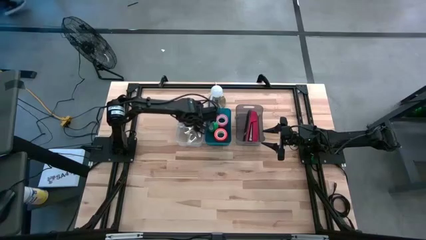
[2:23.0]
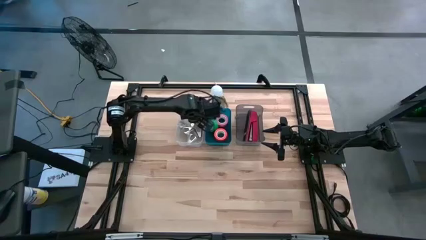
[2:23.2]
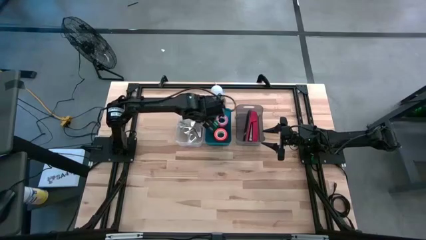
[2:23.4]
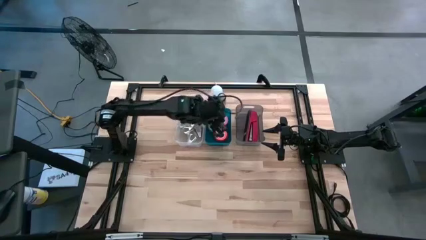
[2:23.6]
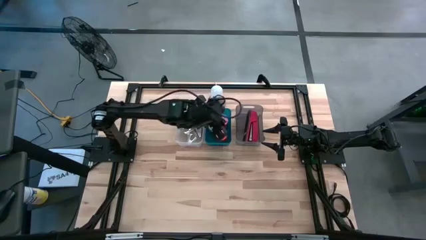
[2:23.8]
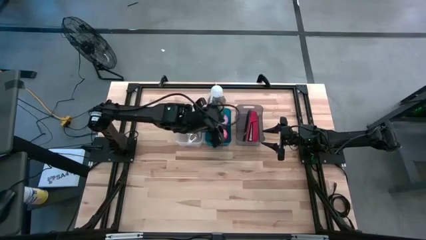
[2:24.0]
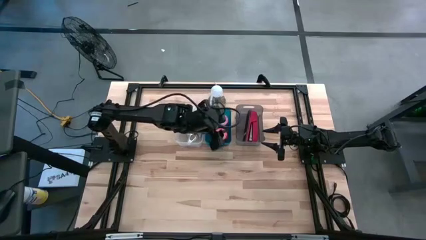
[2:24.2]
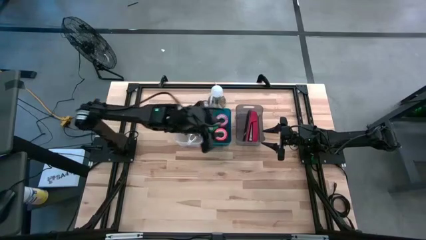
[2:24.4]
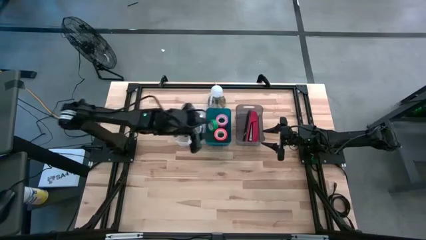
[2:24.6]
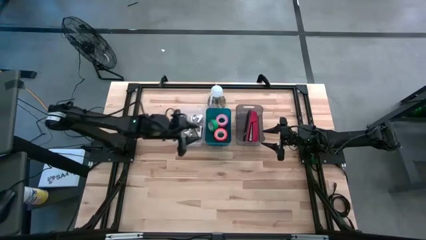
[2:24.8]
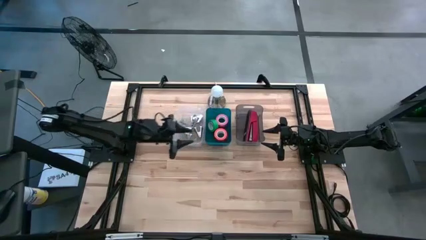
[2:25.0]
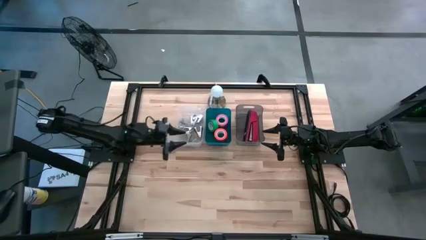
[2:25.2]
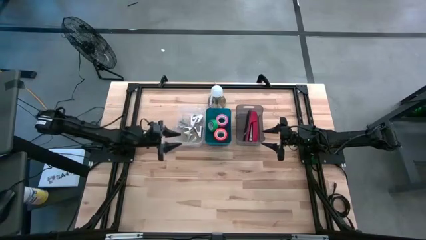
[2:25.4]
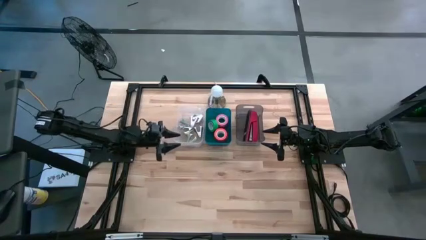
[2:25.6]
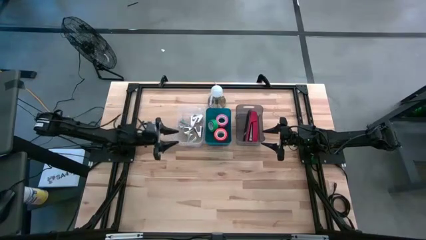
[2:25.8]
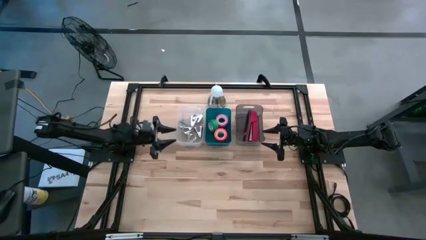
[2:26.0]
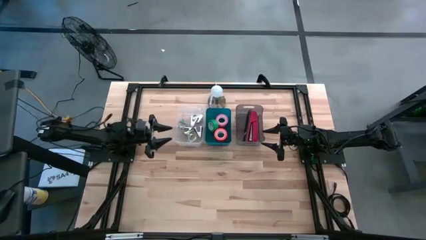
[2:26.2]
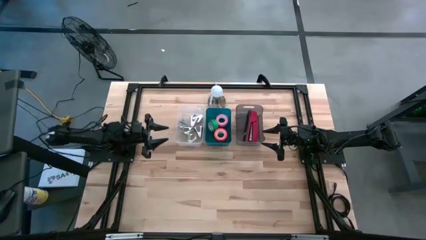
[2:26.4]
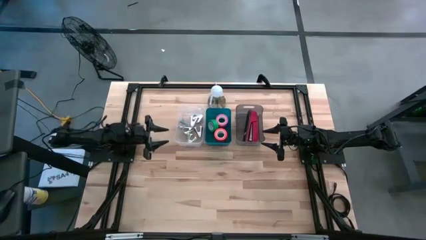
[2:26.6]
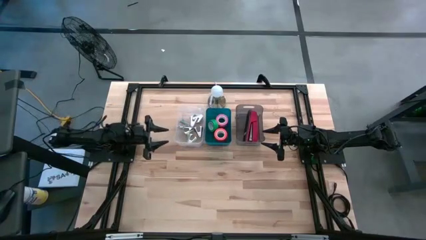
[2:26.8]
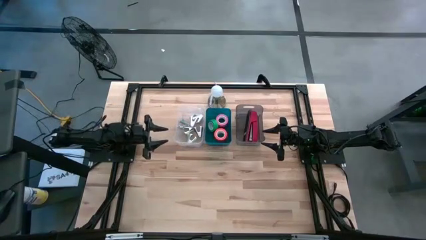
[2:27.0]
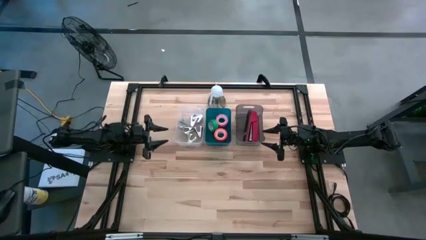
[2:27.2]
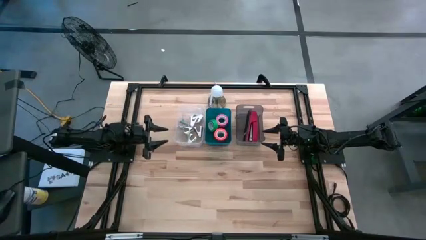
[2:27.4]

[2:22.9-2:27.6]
Task: Pick and place Stapler, Stapler remover, tape
Return to Home Position

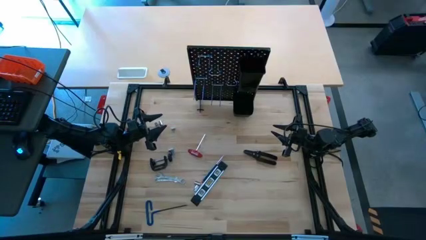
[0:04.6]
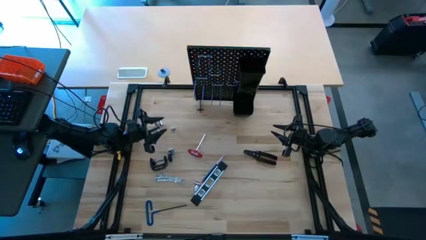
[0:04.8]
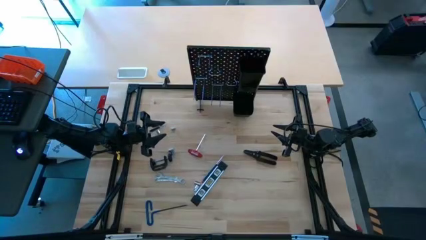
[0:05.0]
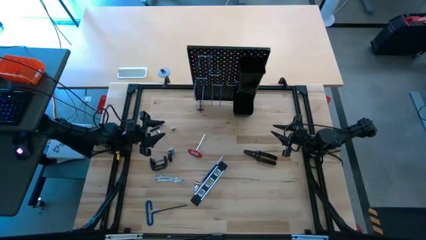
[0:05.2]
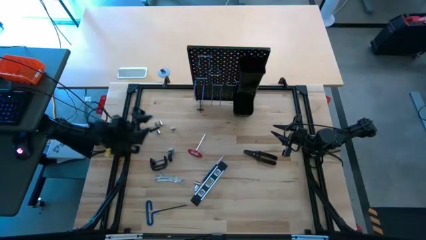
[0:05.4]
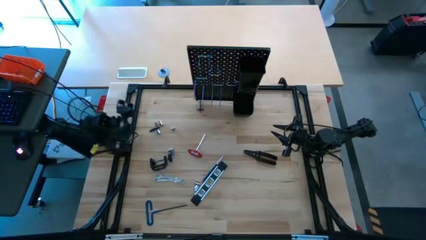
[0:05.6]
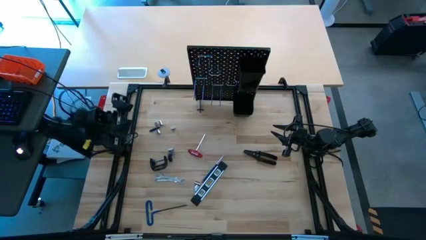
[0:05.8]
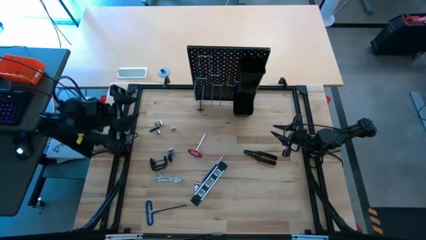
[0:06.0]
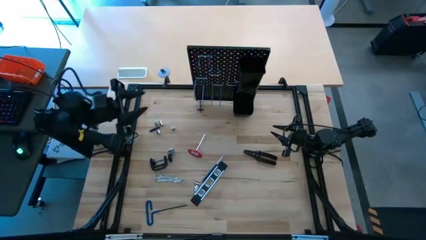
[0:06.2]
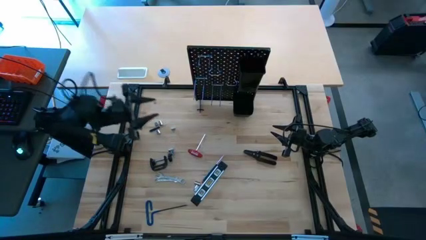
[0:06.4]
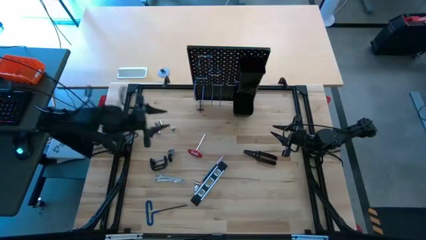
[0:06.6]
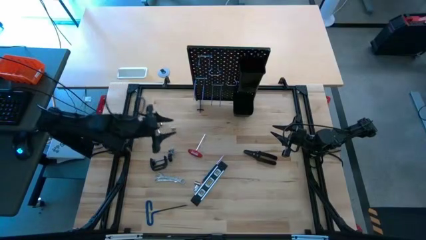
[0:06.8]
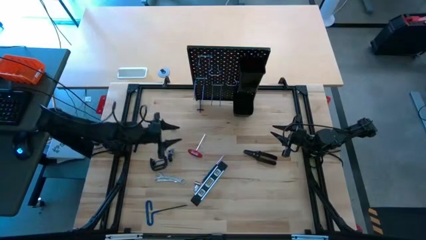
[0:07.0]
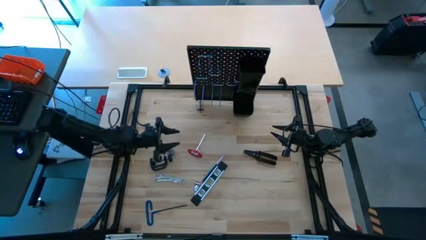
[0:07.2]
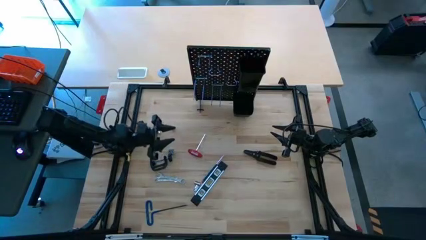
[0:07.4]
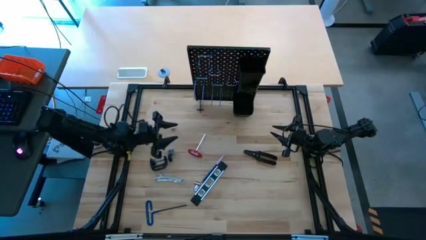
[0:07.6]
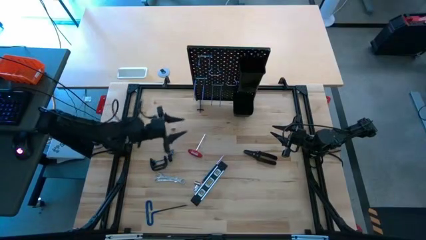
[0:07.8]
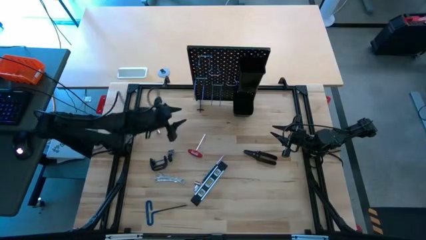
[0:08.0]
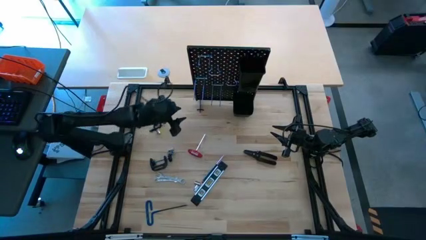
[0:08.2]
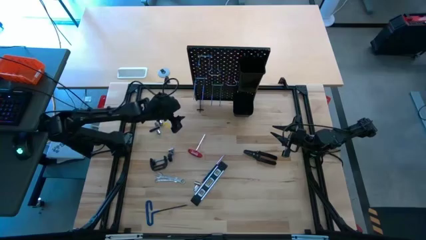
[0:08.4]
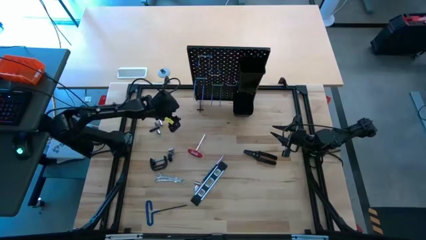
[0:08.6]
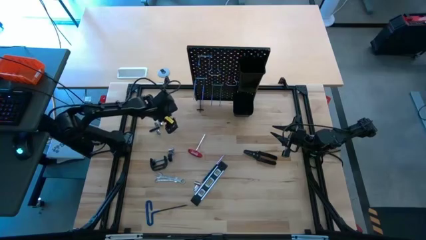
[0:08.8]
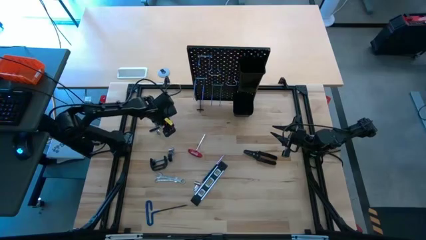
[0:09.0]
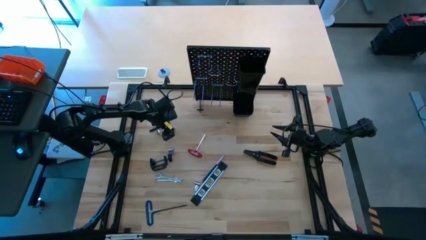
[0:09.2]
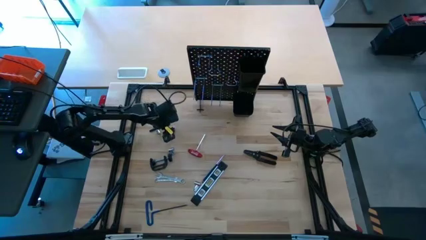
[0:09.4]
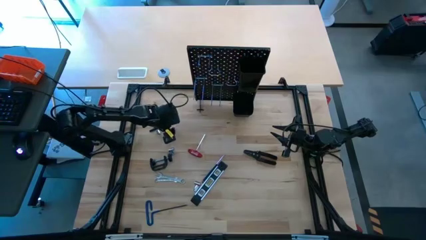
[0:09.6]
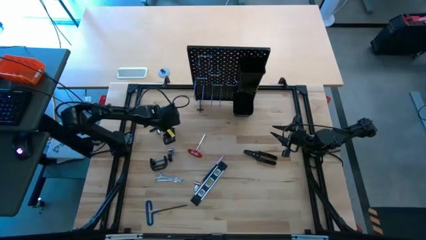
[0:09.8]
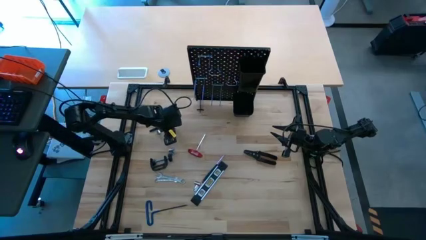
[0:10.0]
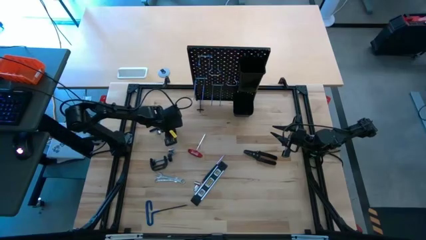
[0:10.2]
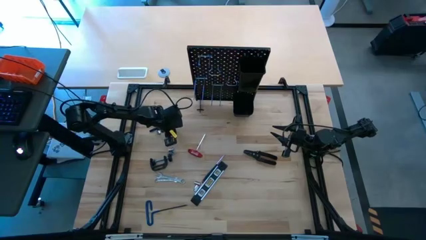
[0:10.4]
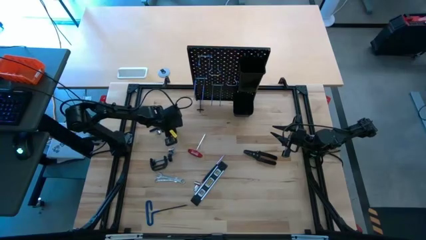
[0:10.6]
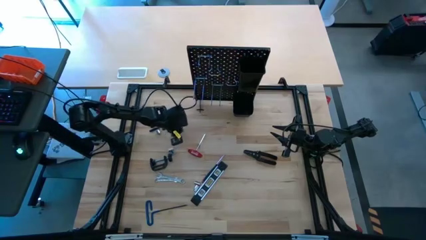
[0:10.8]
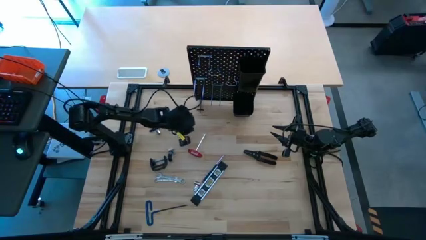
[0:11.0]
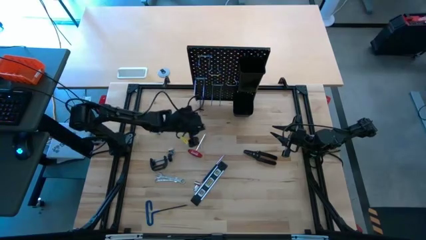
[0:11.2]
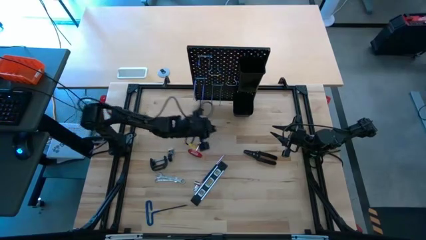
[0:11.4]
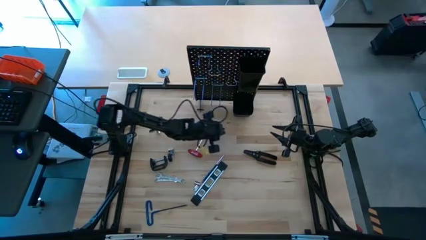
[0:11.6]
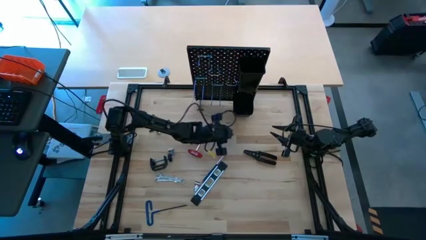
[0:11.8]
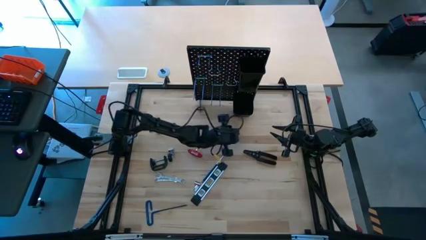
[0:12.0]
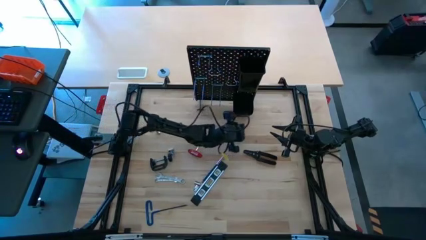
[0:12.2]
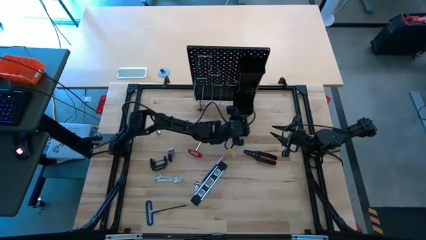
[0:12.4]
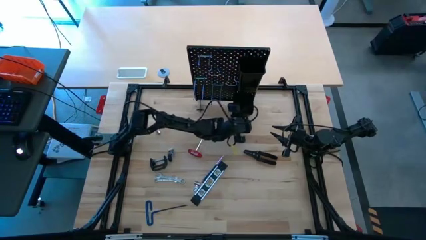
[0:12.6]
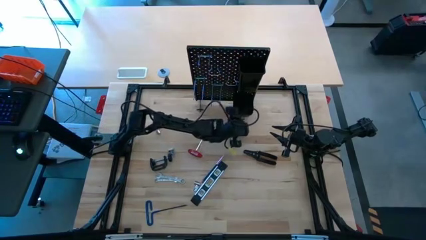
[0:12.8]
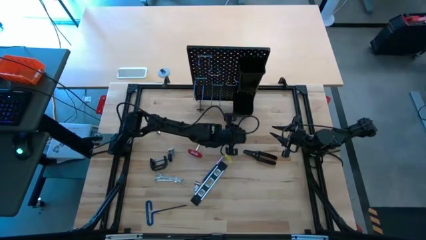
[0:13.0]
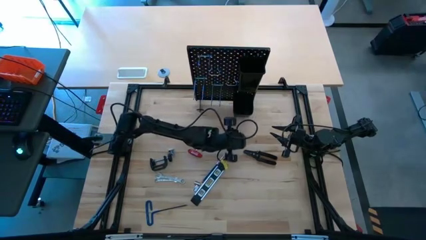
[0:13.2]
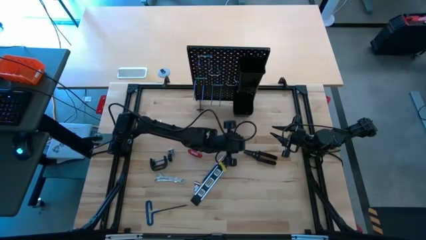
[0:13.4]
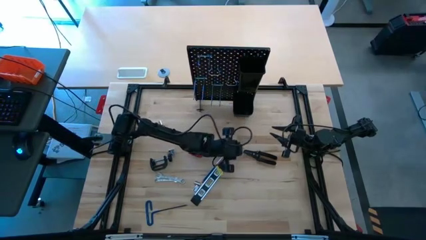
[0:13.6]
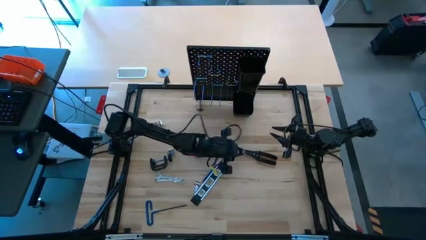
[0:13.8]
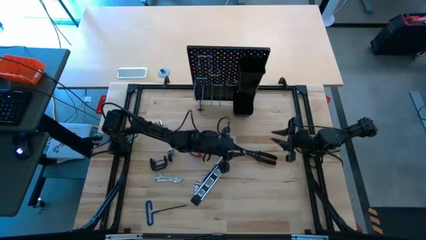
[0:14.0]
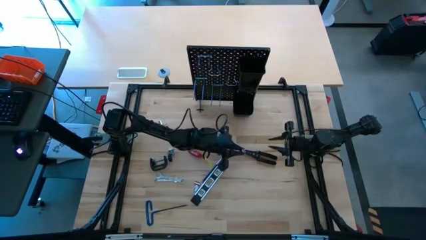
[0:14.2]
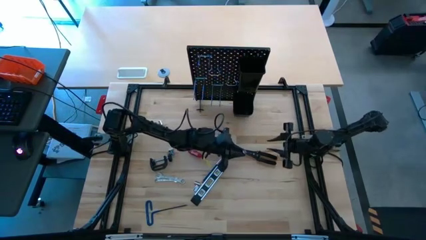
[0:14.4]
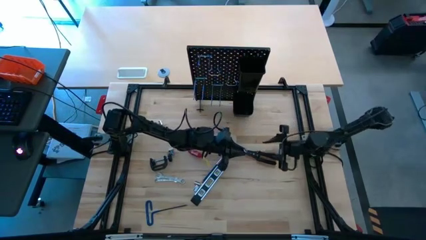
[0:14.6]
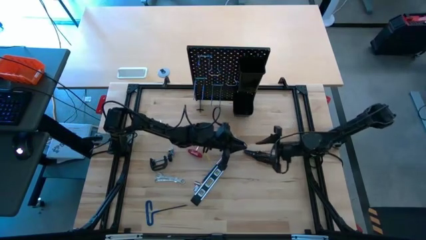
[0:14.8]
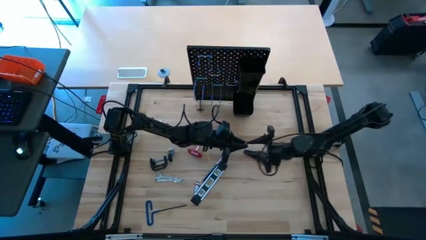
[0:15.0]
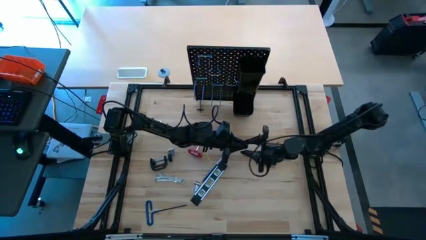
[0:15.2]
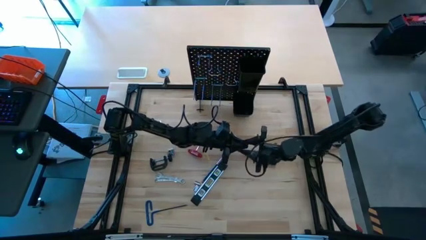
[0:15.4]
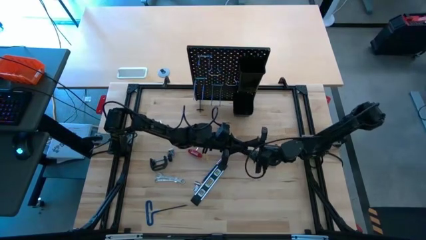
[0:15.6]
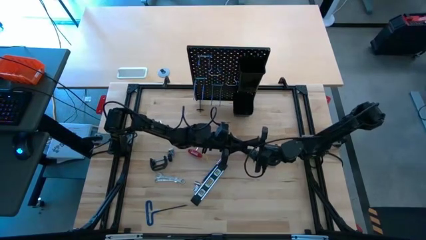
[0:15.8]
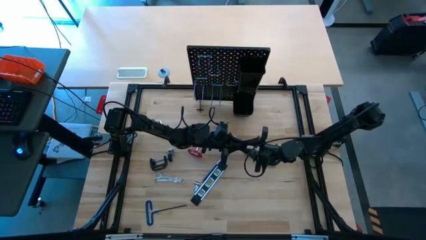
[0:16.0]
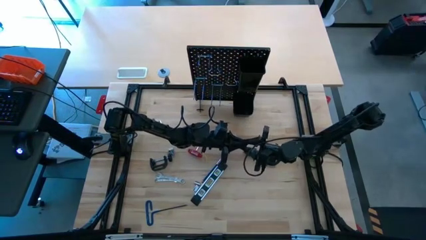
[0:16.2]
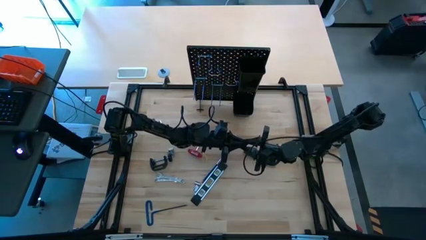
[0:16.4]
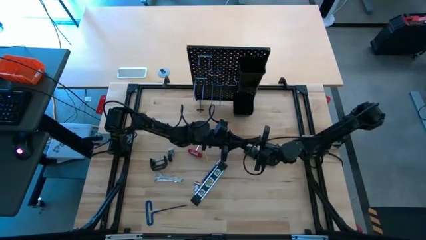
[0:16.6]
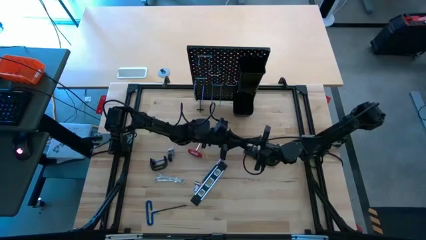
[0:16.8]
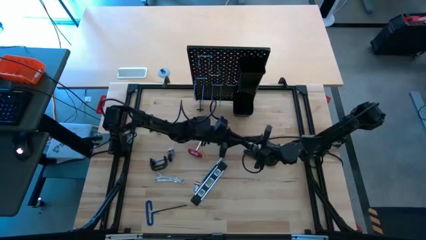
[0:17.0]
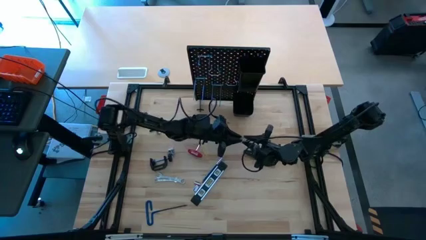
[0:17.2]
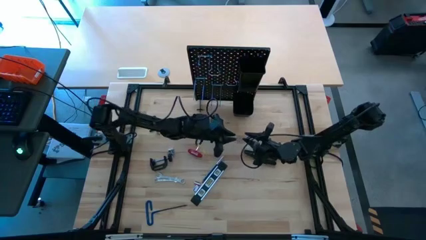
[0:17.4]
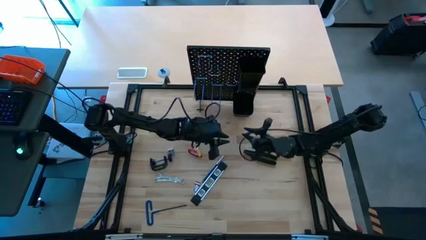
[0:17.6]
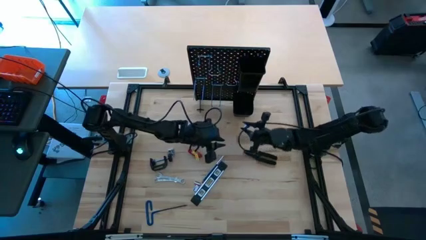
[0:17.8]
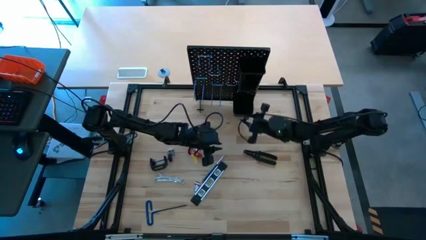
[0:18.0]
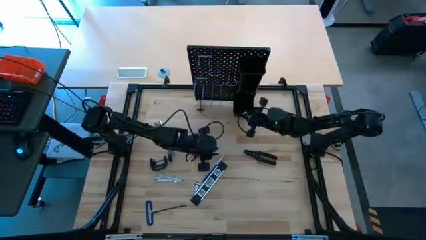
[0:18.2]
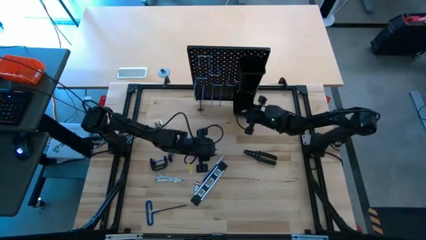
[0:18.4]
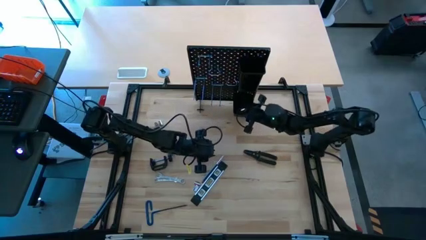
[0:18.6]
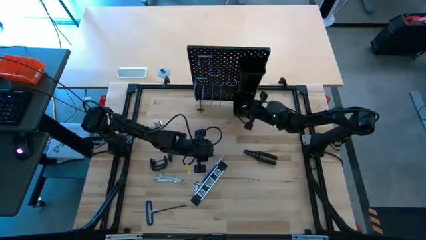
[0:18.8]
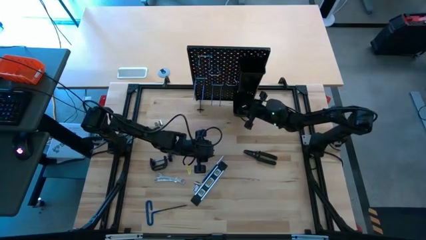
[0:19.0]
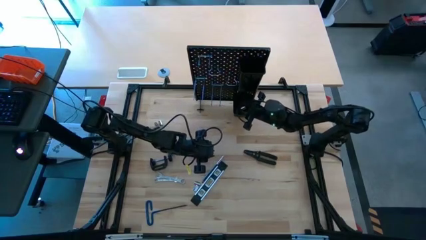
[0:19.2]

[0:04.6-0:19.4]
Task: Hang tools onto peg board
Put the socket into the bottom black bin on the peg board
